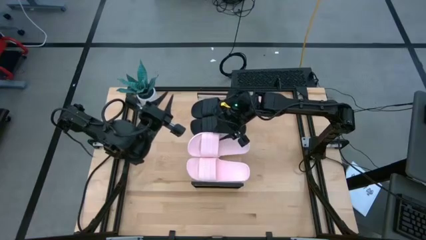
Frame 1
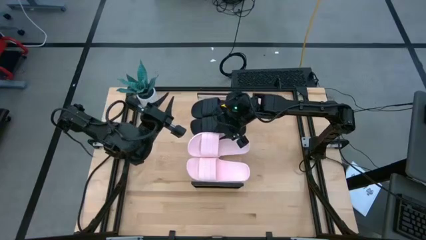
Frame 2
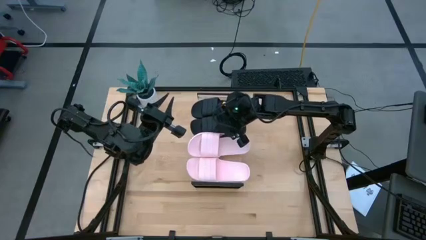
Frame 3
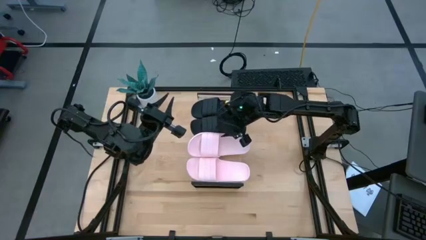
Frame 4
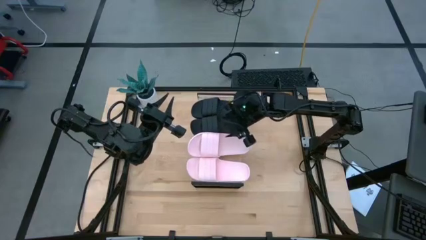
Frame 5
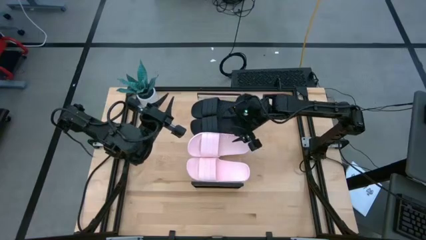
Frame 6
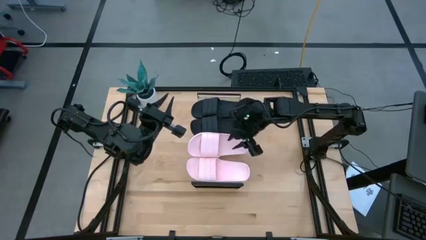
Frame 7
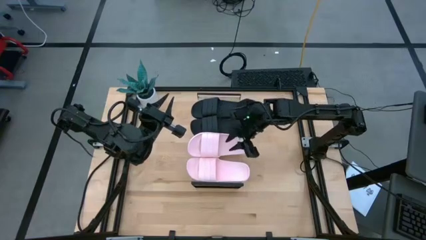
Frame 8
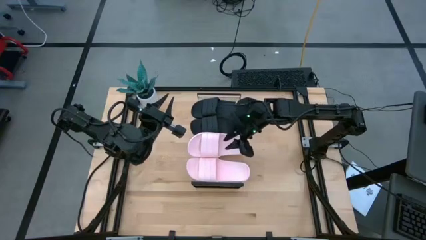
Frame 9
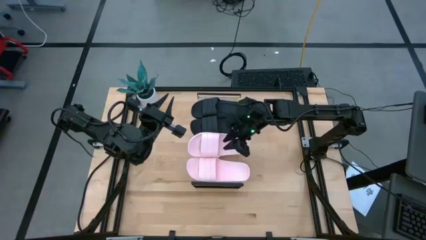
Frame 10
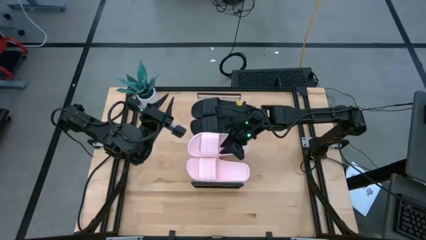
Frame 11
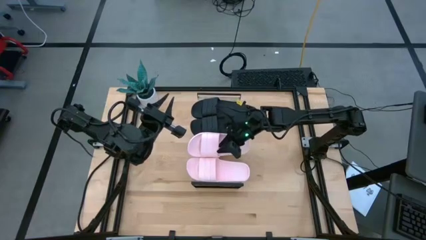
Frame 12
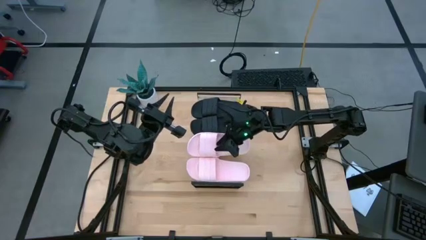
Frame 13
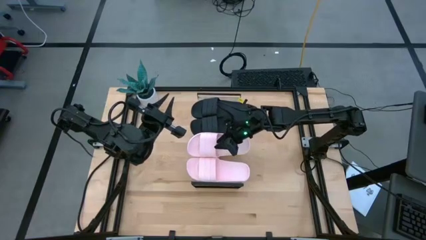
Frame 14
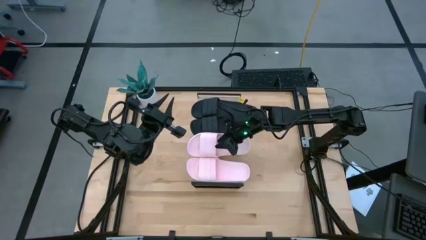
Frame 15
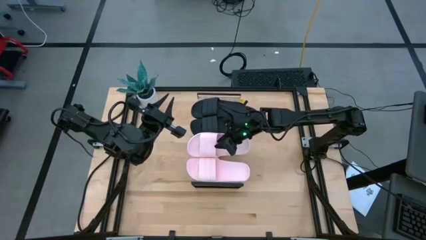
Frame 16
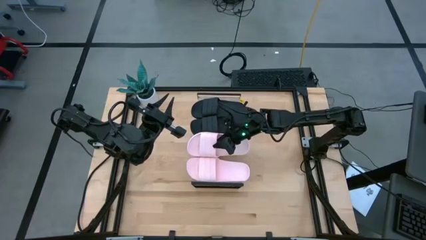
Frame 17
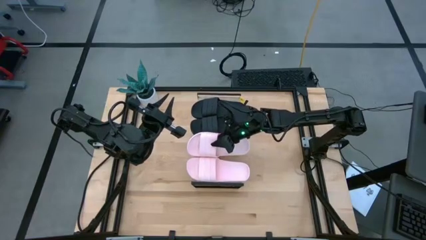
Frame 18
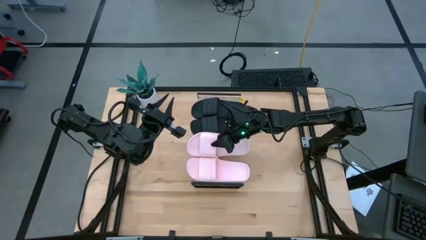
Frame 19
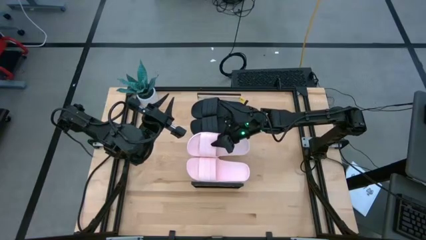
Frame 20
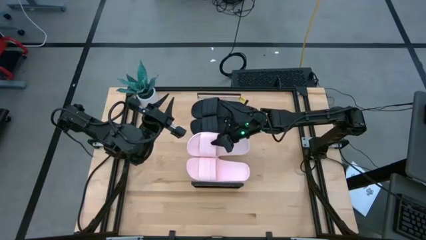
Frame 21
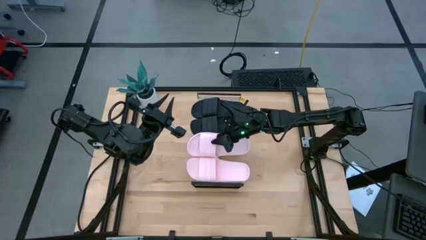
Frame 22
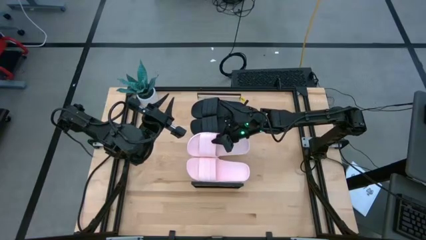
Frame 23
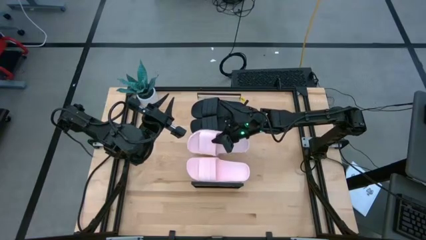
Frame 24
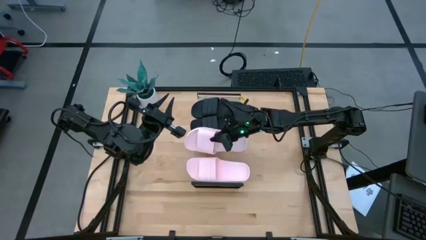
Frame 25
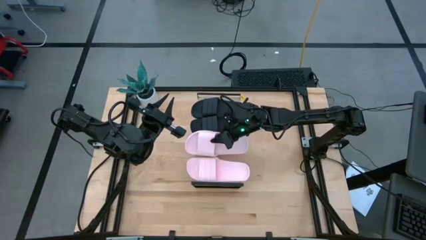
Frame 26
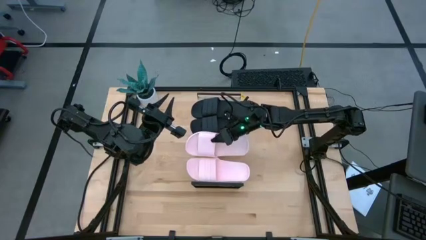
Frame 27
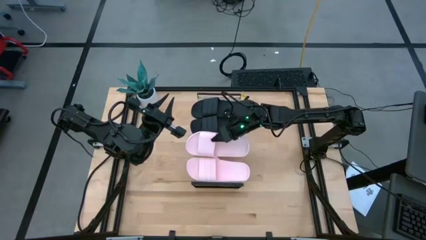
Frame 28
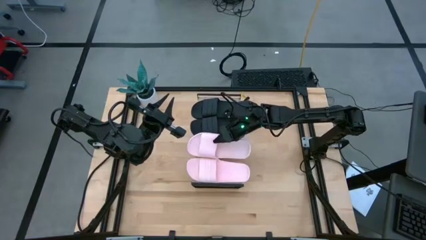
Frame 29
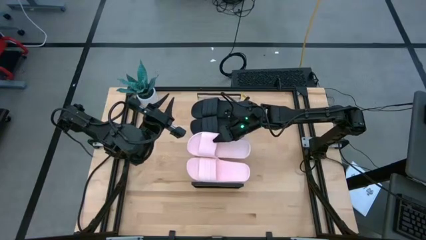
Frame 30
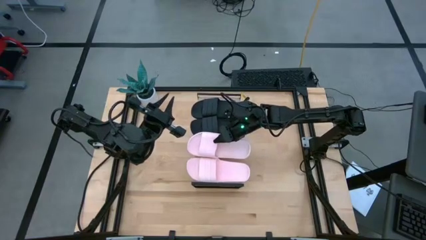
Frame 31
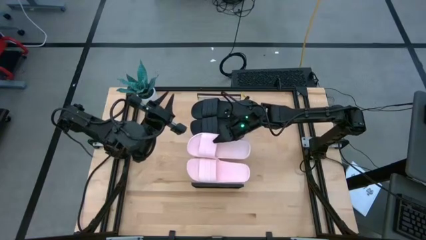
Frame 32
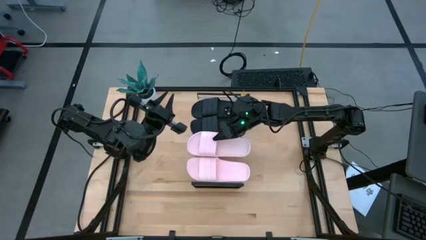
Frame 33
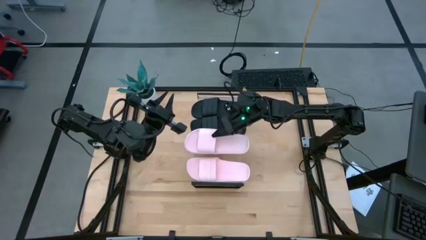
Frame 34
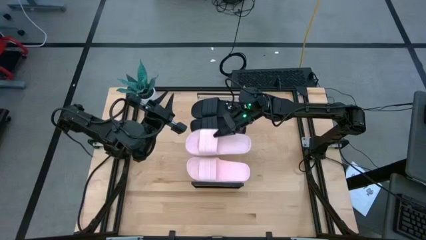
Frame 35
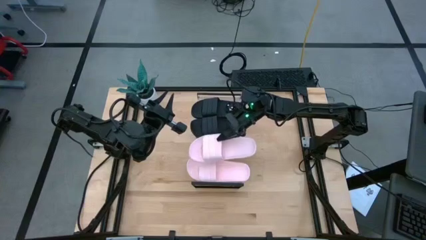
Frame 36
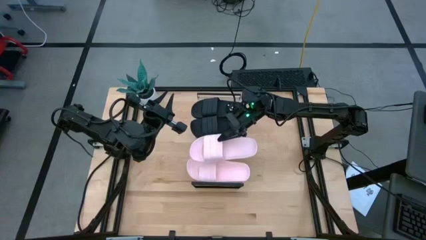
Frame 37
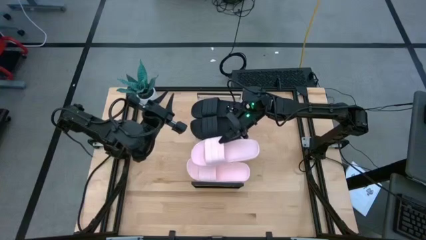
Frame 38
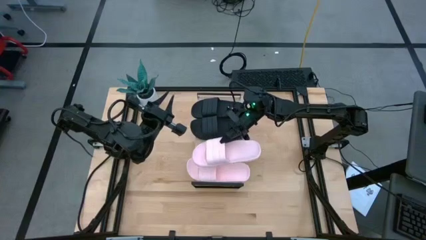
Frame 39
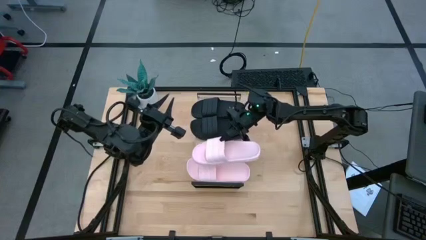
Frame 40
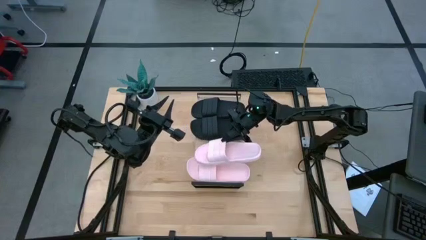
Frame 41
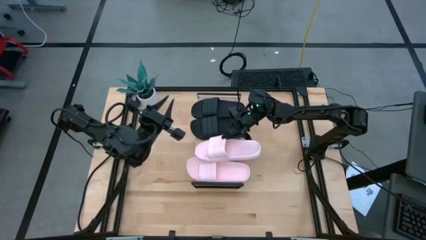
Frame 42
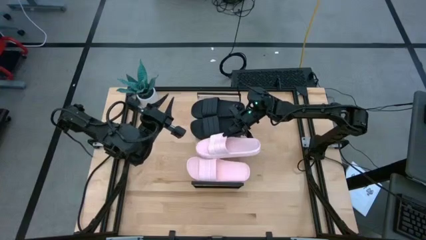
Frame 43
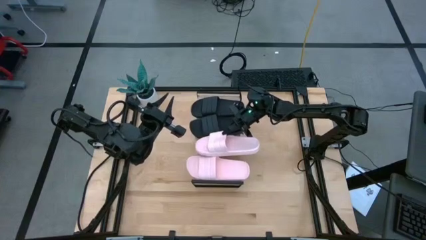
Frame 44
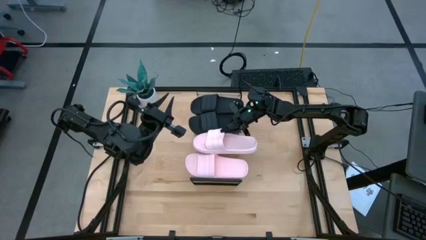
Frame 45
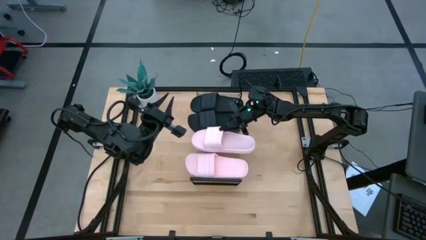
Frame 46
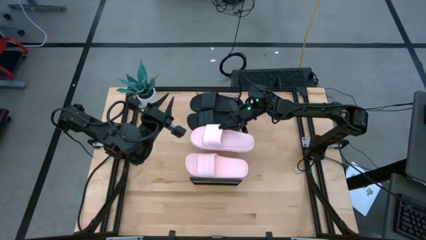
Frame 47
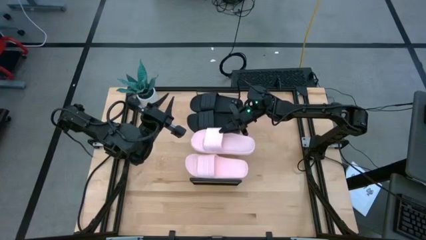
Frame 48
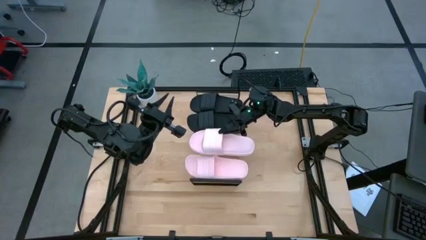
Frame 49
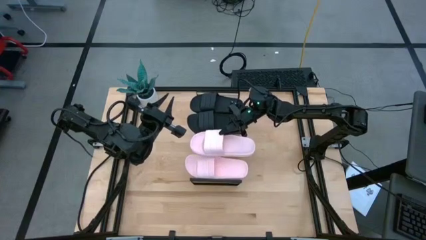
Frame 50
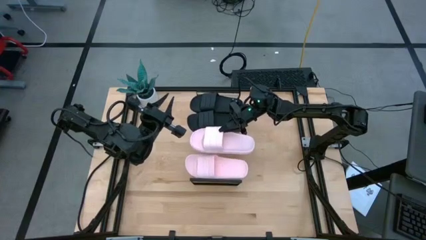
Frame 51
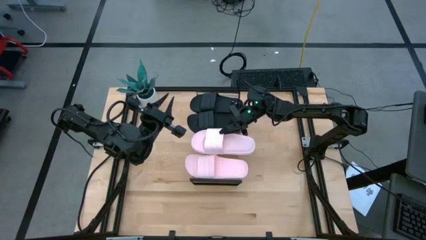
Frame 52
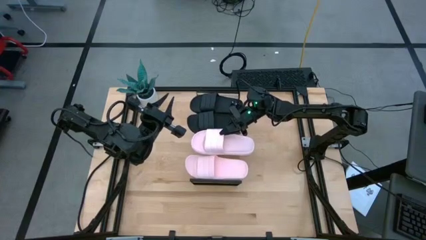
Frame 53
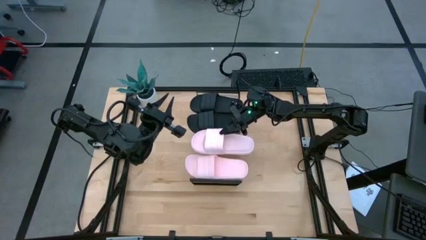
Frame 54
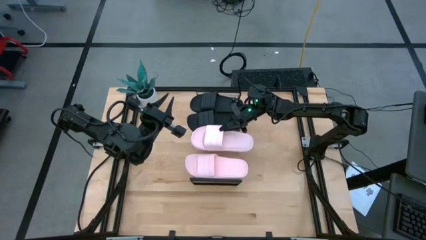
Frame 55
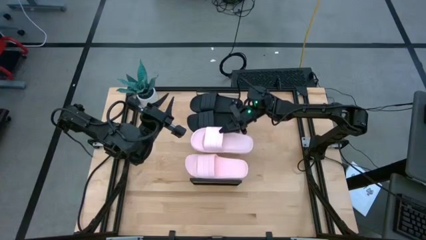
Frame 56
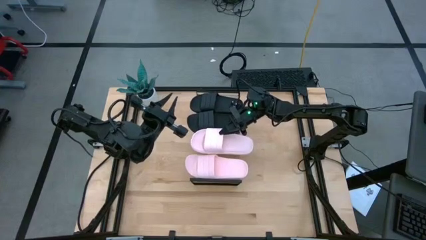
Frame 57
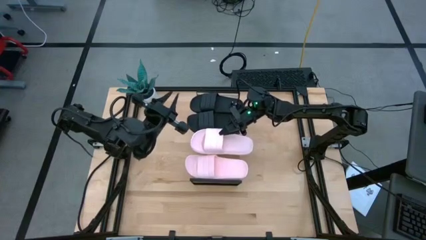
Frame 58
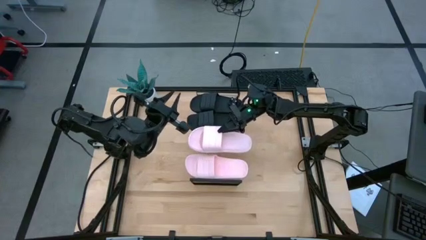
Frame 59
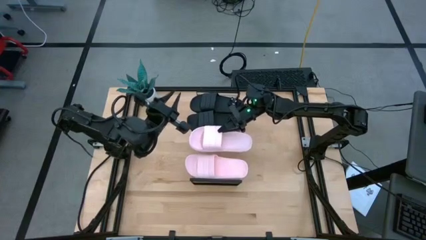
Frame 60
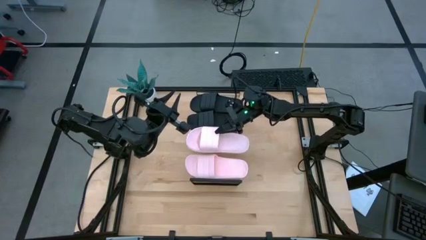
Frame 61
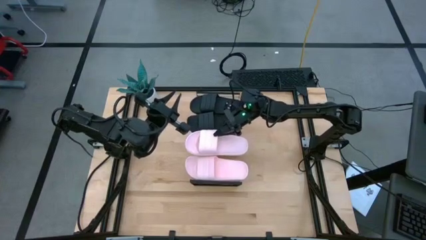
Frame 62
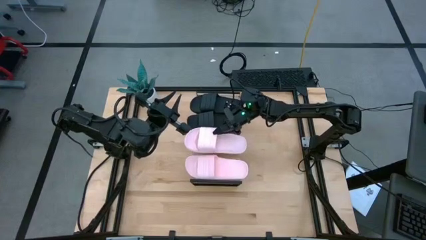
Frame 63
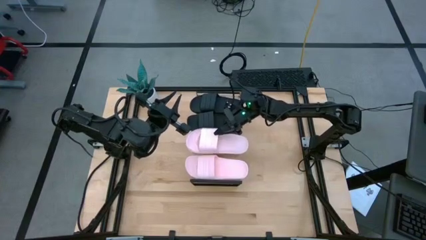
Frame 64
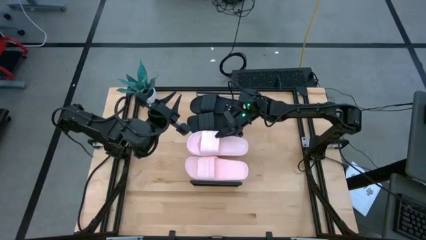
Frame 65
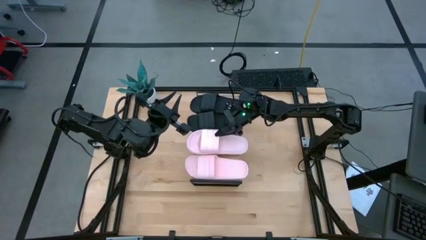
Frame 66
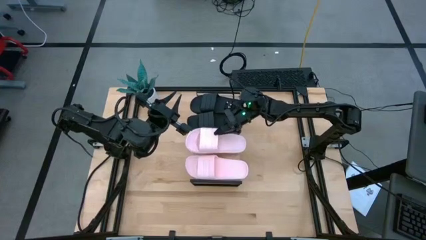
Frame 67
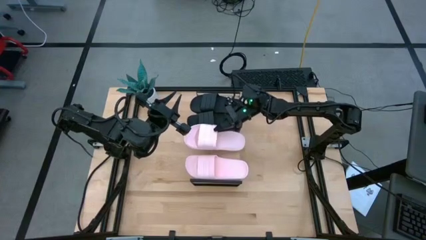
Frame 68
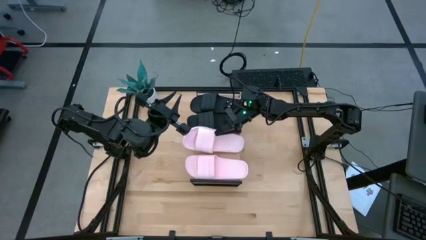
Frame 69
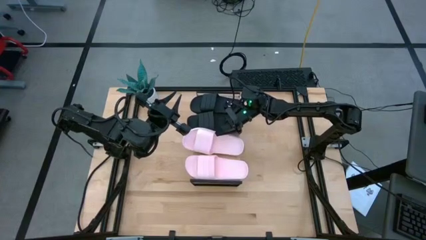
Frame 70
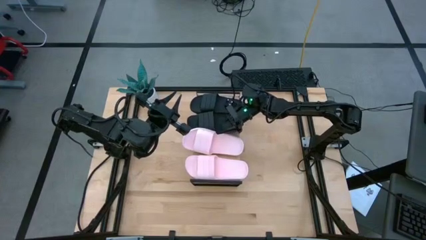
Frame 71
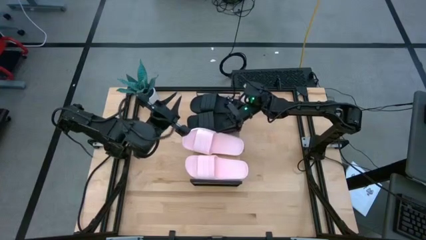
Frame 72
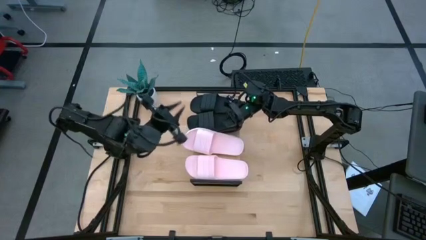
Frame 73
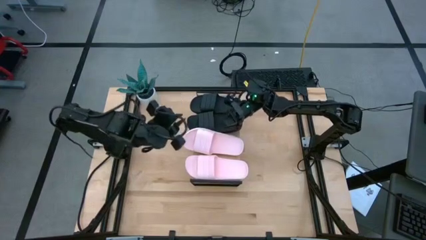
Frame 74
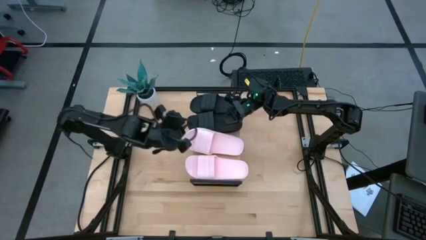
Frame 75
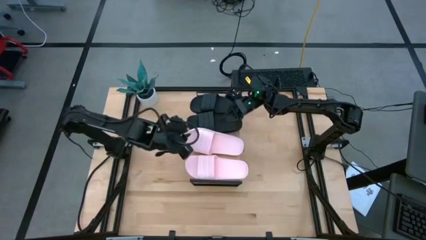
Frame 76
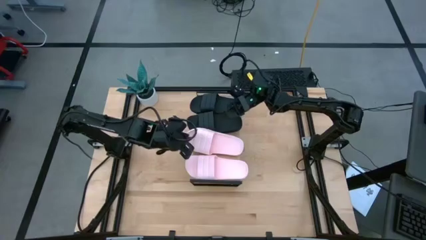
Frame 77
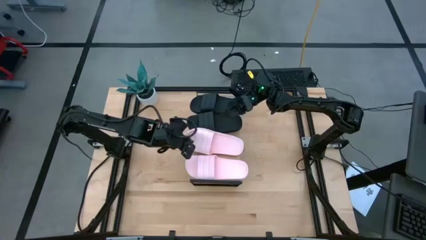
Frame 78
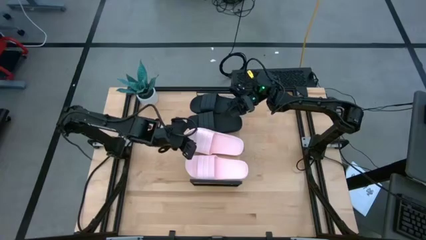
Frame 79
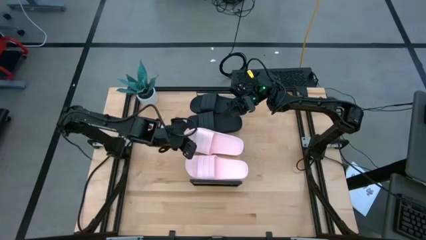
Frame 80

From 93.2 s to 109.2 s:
Task: Pick and place slides into the shelf
Adjust the white slides on the shelf

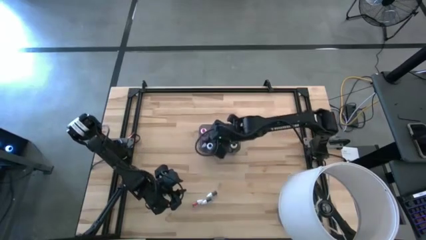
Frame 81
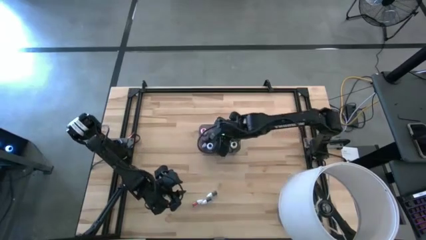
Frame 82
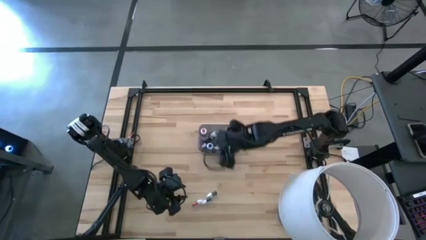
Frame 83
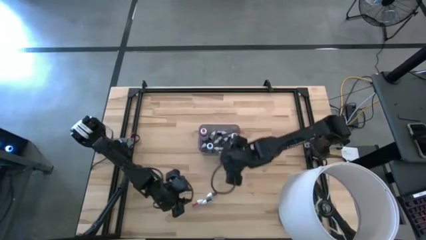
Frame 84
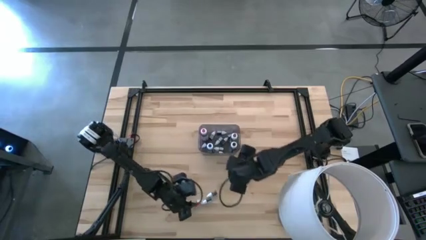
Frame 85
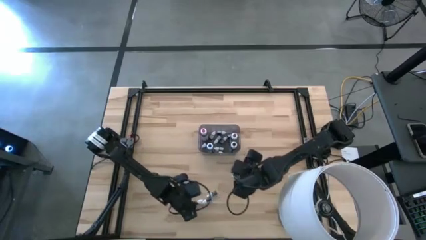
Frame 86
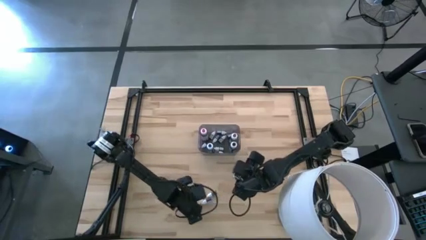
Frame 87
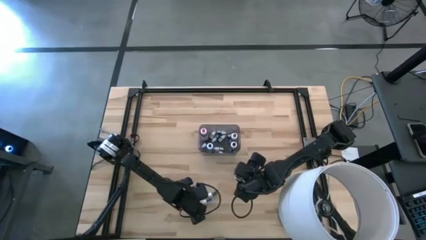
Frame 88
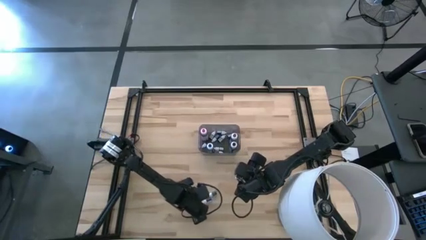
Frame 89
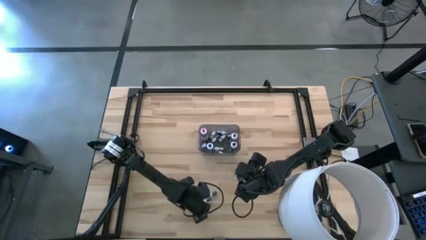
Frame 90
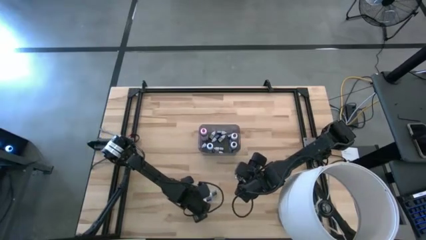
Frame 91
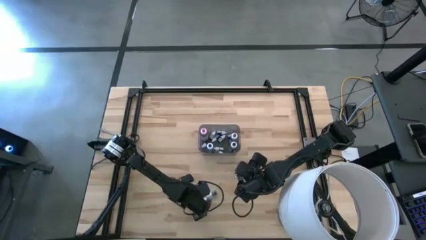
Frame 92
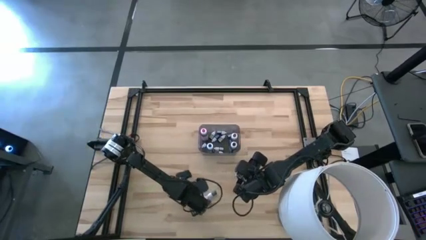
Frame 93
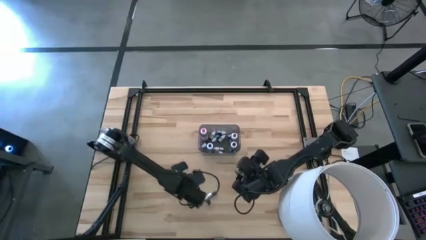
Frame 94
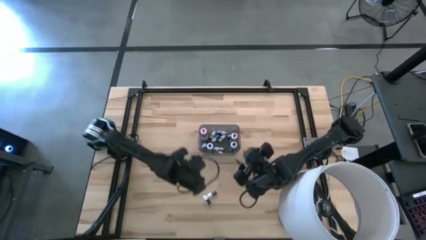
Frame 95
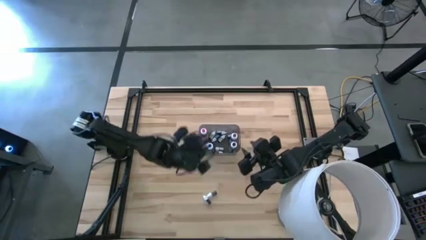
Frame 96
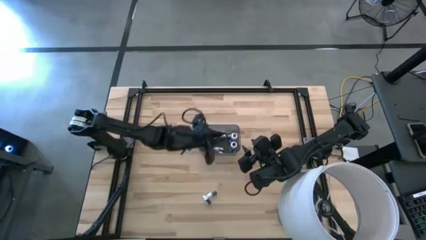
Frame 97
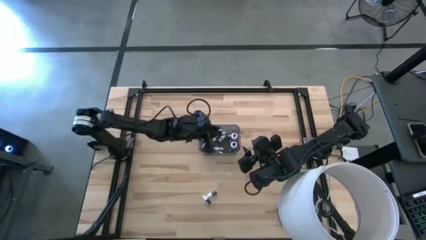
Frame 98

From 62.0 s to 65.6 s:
Task: Pick & Place food coloring
Put the small red food coloring bottle in the black bin
